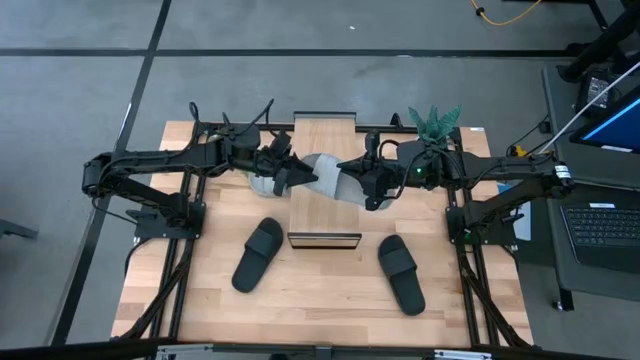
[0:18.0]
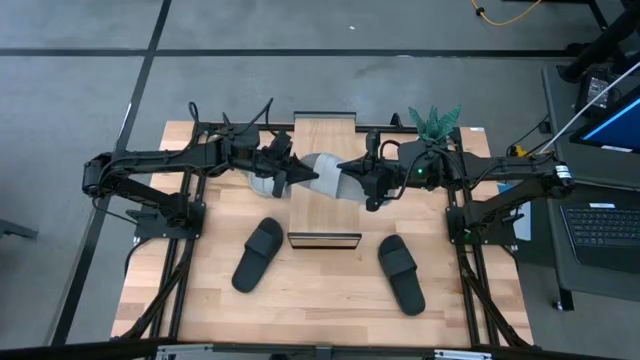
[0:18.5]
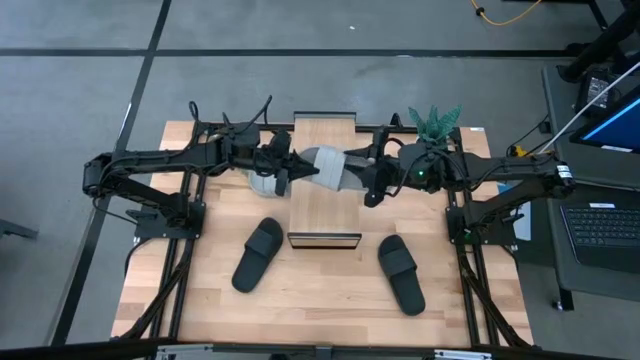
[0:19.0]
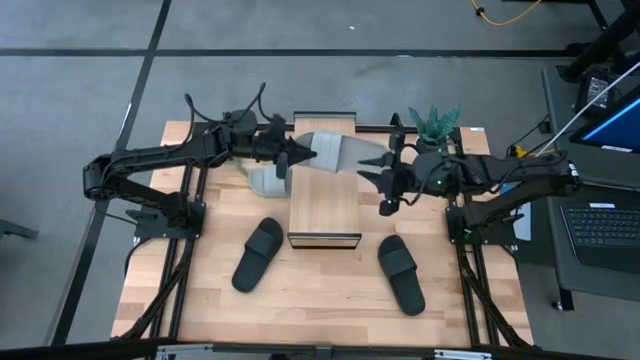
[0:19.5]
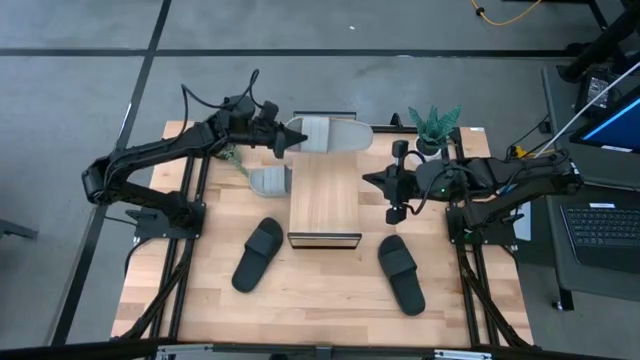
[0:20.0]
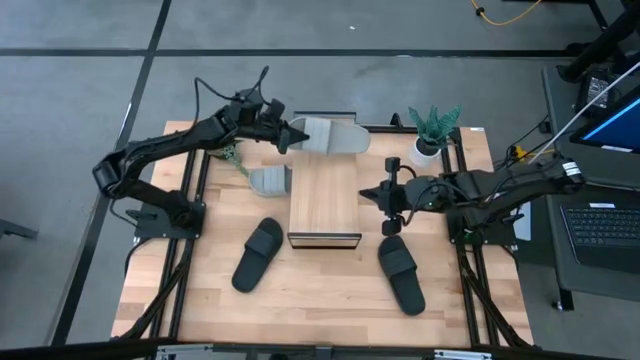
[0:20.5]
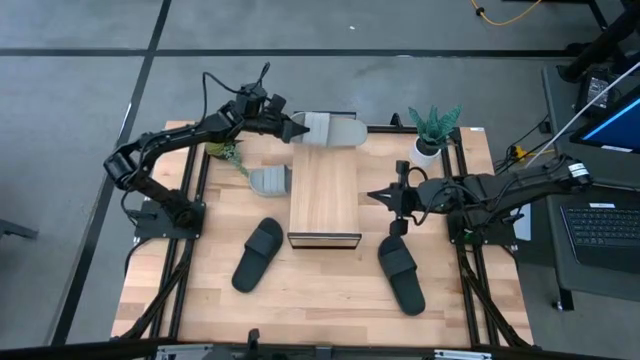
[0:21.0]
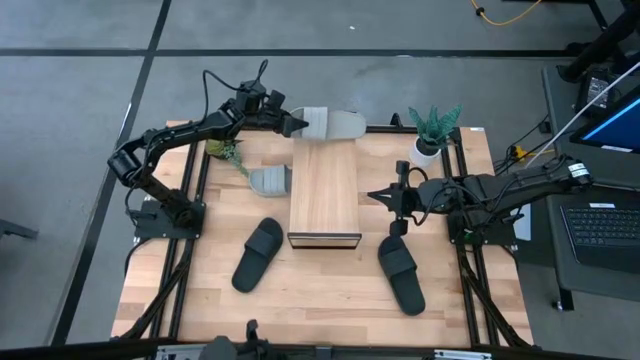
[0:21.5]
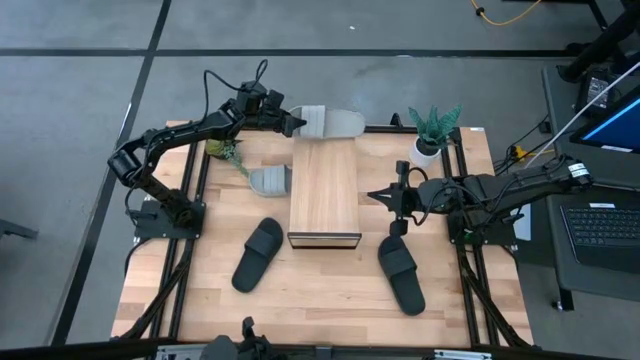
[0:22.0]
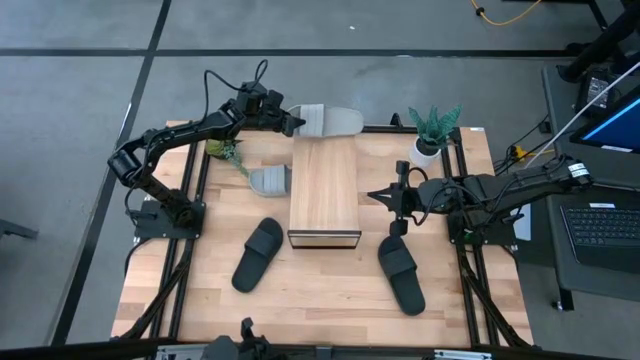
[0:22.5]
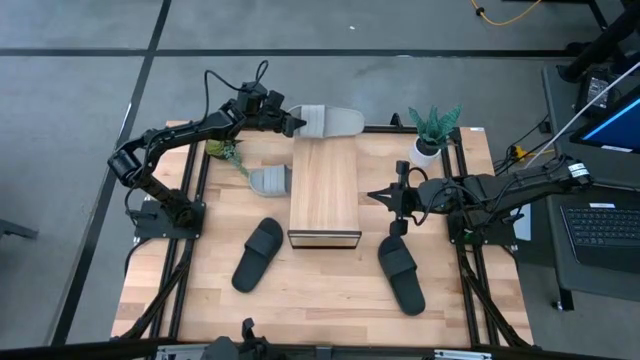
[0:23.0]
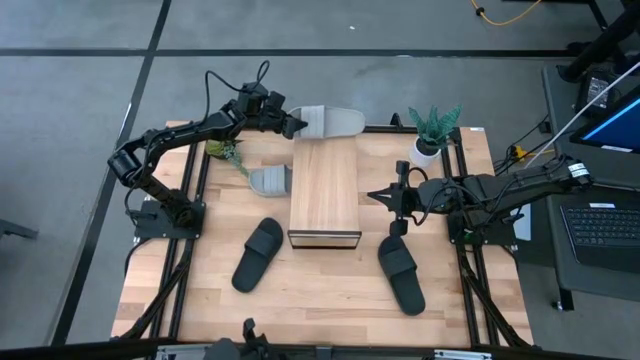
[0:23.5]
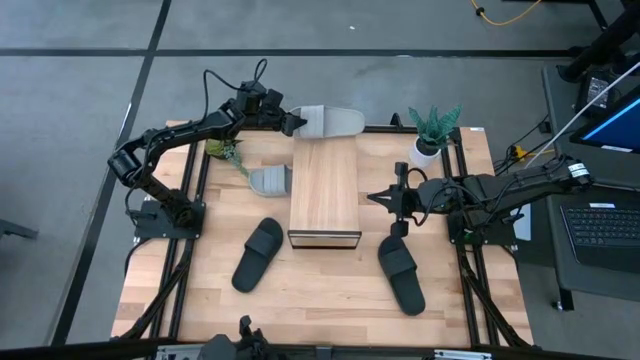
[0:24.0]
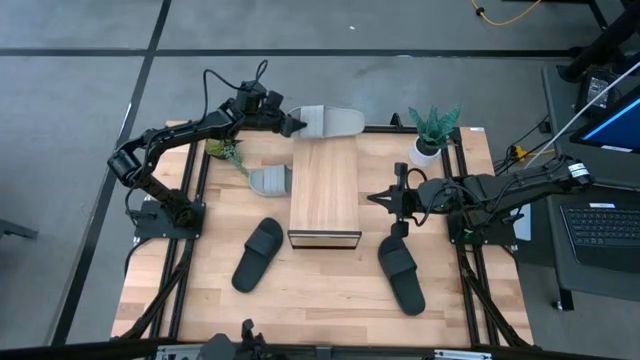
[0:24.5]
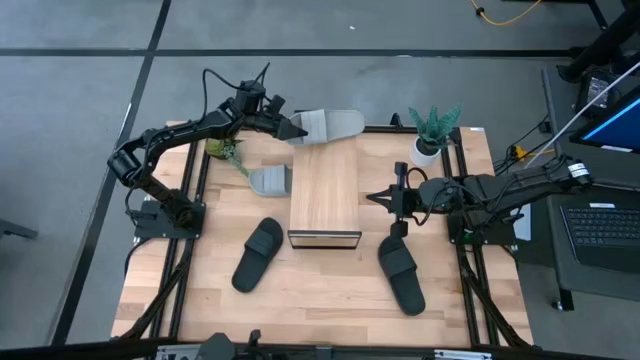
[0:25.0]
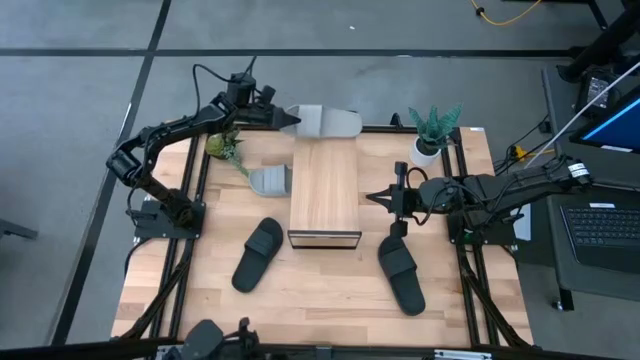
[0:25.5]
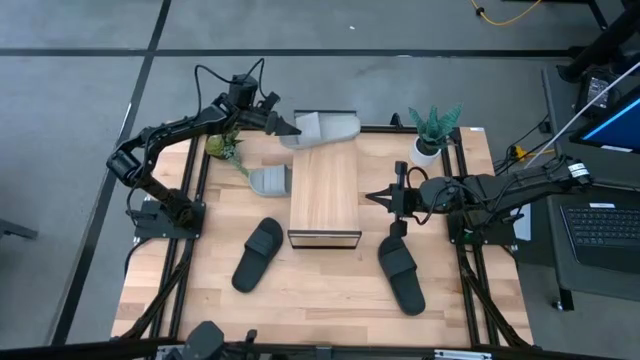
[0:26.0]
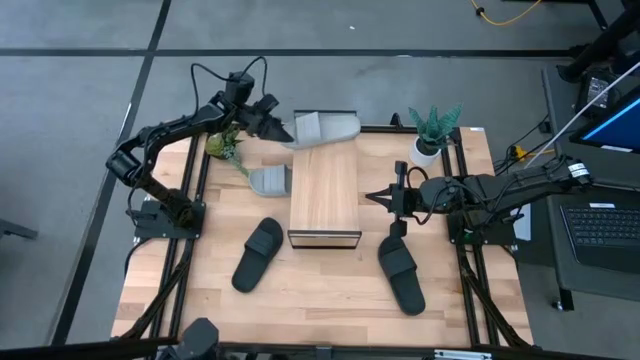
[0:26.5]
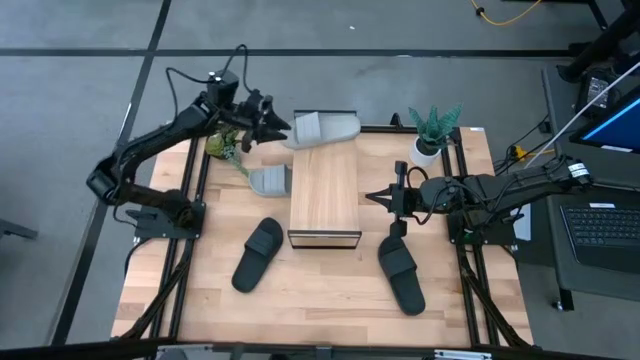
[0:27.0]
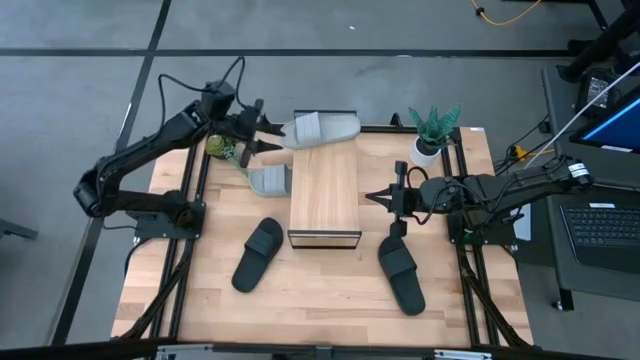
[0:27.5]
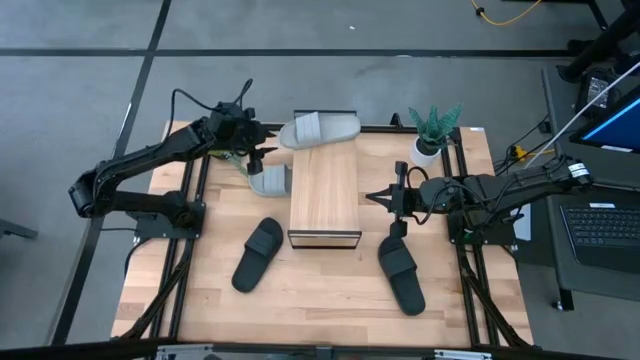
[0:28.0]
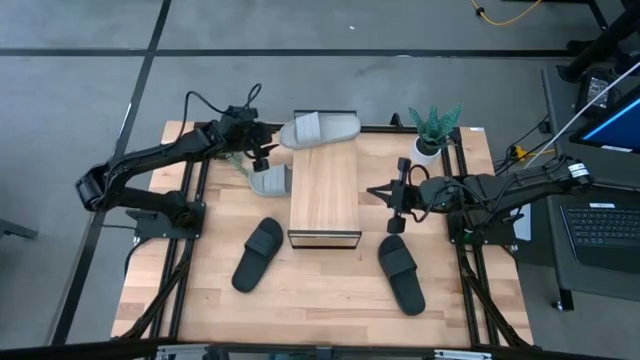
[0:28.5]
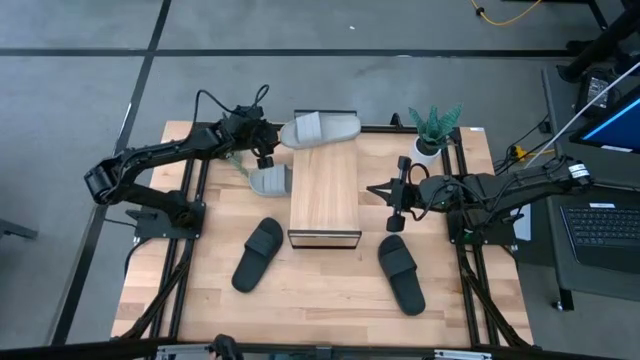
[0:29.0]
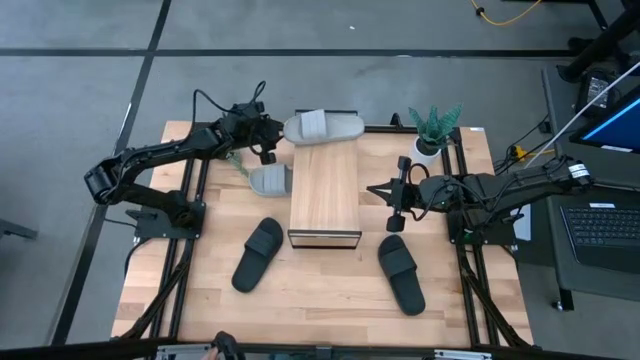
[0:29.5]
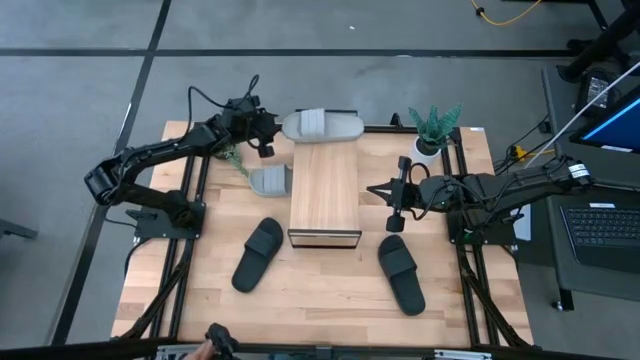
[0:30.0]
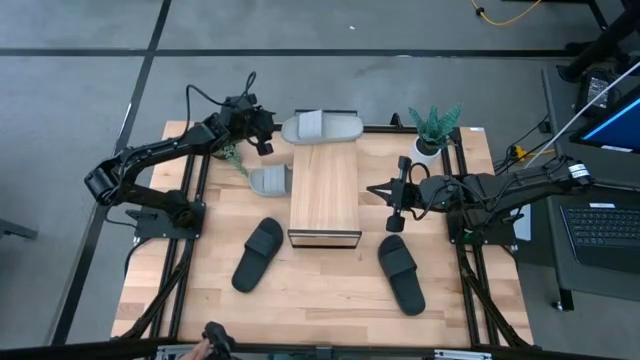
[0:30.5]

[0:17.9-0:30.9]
Task: Pick and place slides into the shelf
Put the right gray slide on the shelf

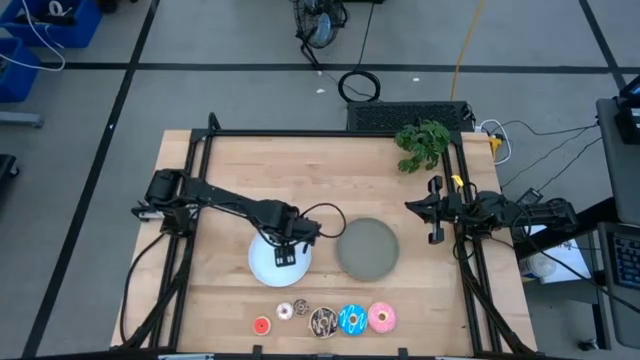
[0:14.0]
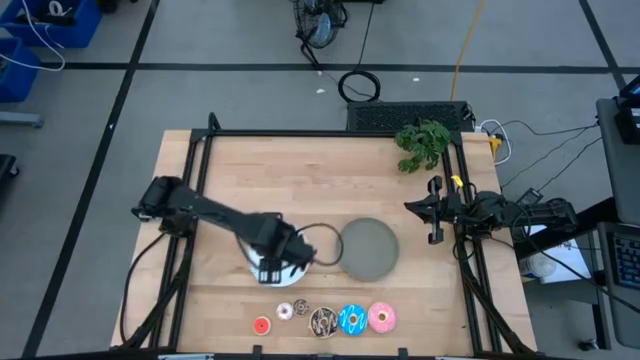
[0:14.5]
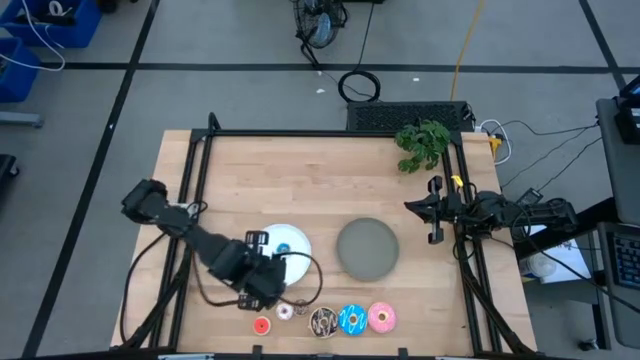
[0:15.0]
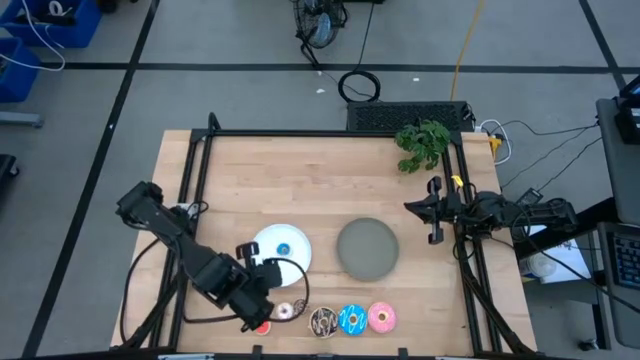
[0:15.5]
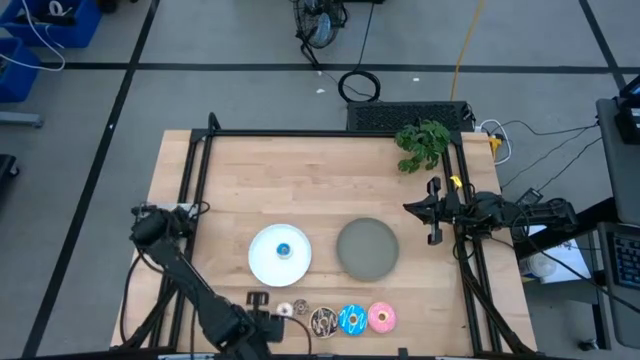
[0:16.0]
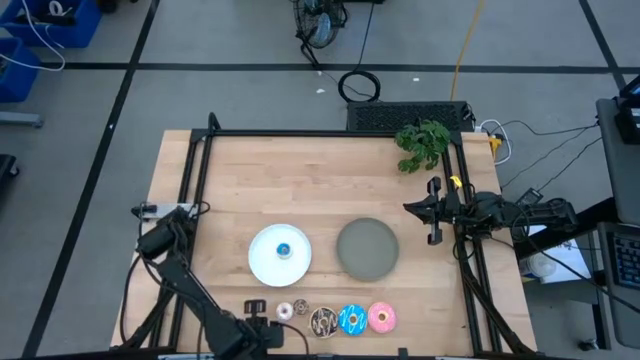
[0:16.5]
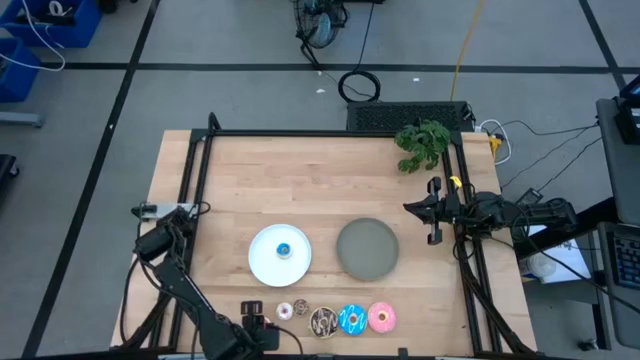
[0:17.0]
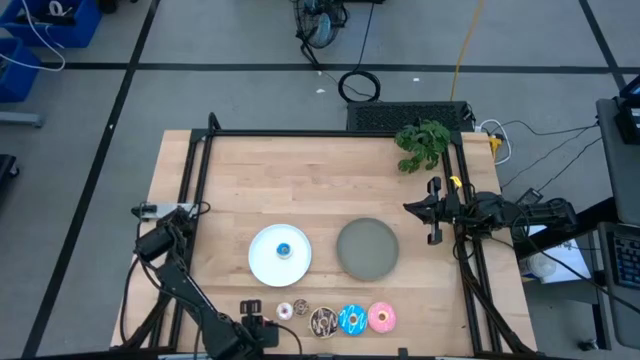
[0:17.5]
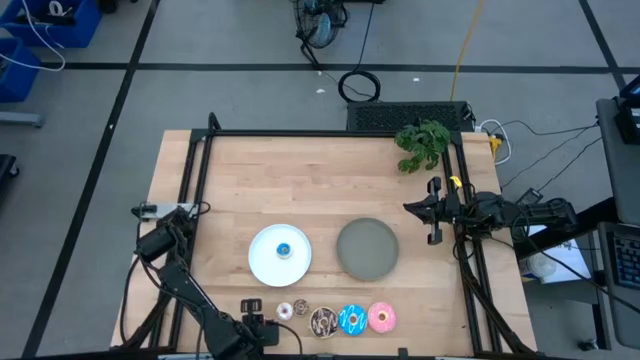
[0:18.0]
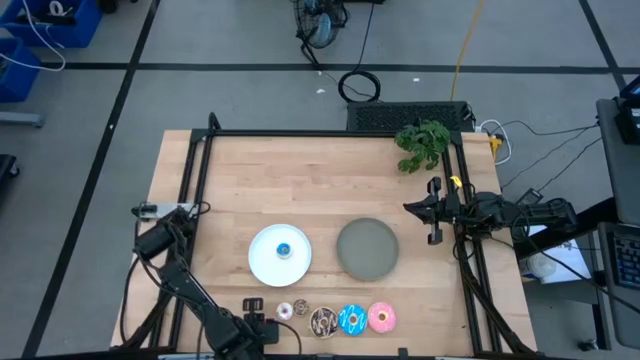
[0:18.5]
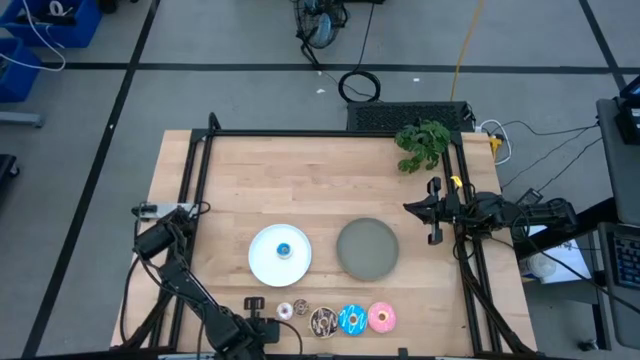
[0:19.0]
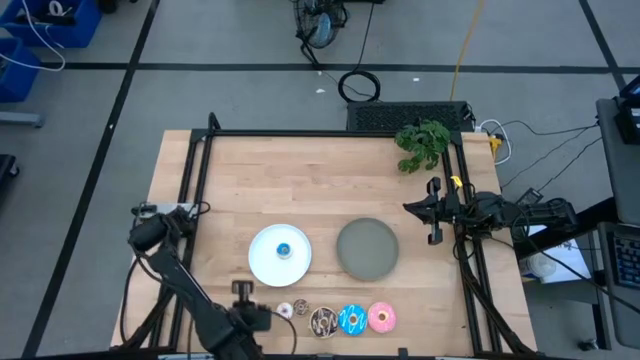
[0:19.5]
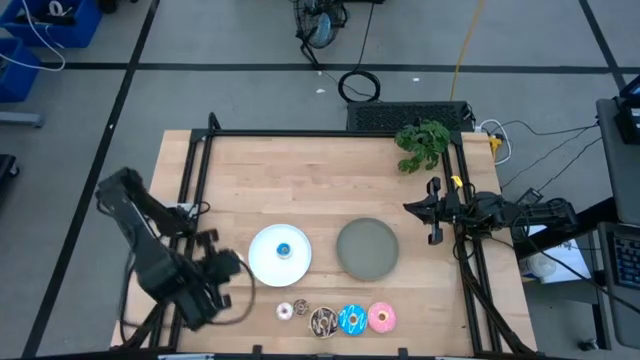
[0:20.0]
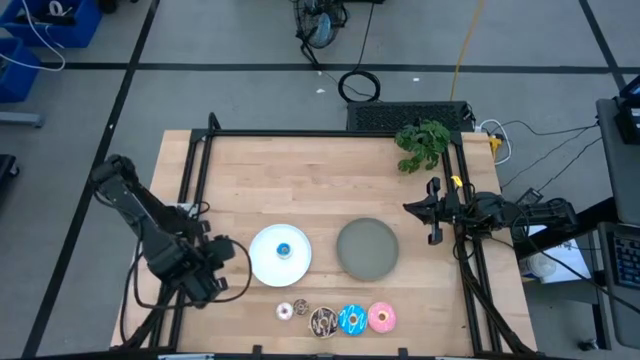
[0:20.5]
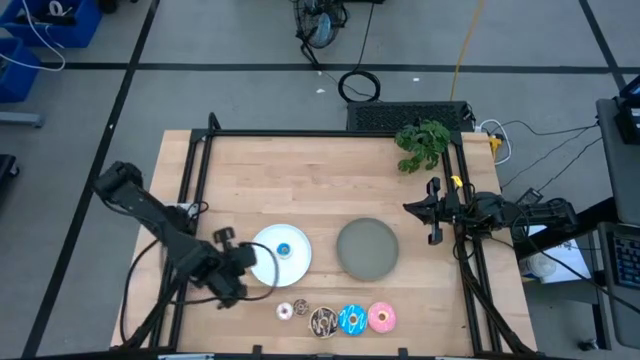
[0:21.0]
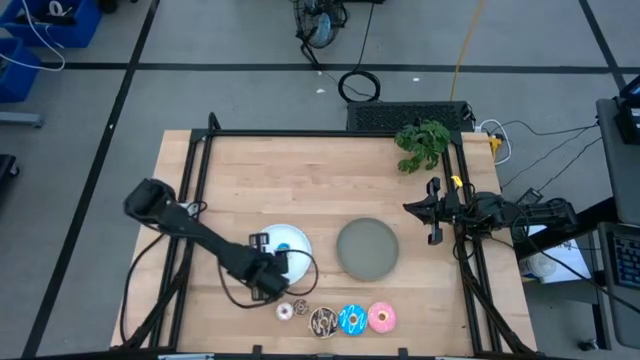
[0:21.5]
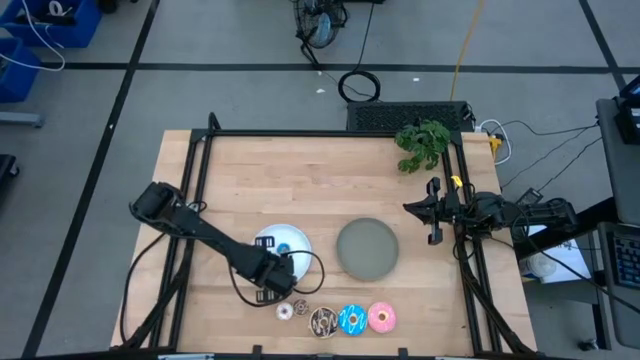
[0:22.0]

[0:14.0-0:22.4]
Task: Pick & Place donuts
Put the small orange donut on the white plate
